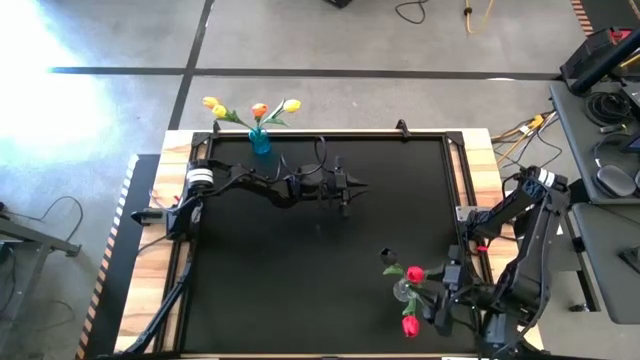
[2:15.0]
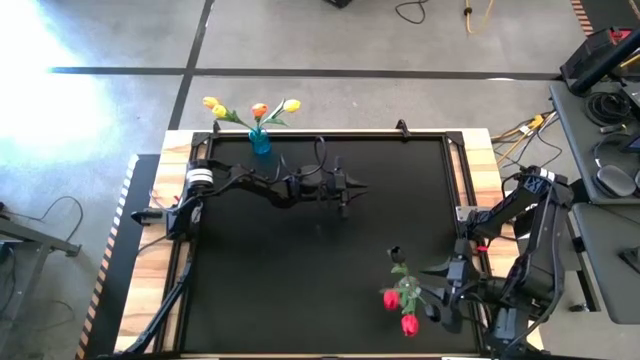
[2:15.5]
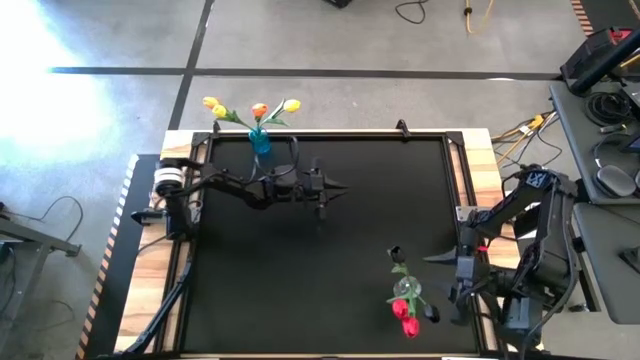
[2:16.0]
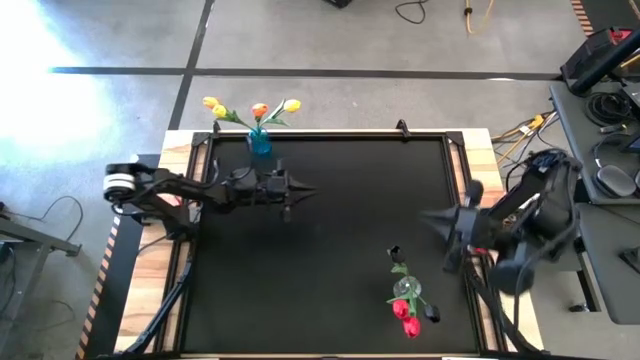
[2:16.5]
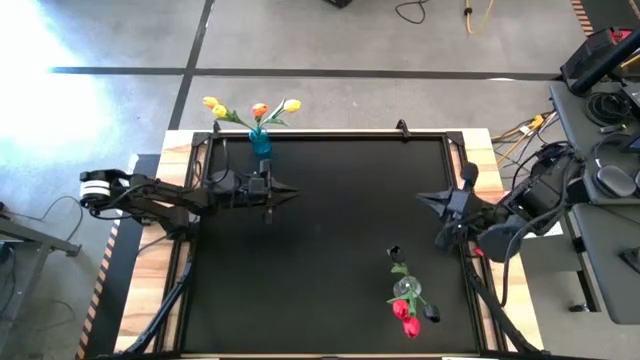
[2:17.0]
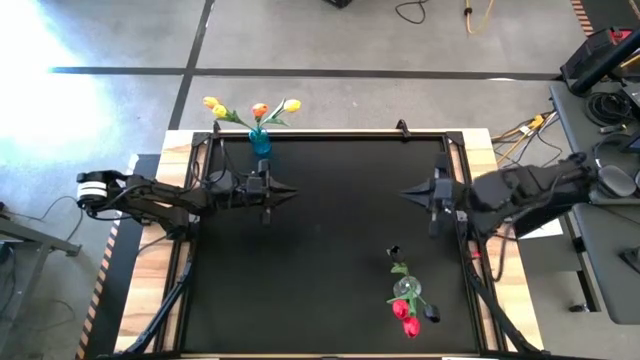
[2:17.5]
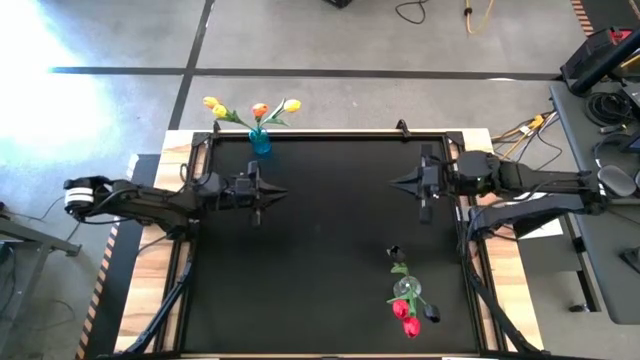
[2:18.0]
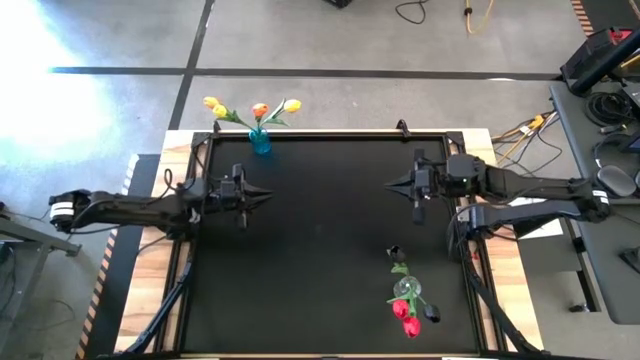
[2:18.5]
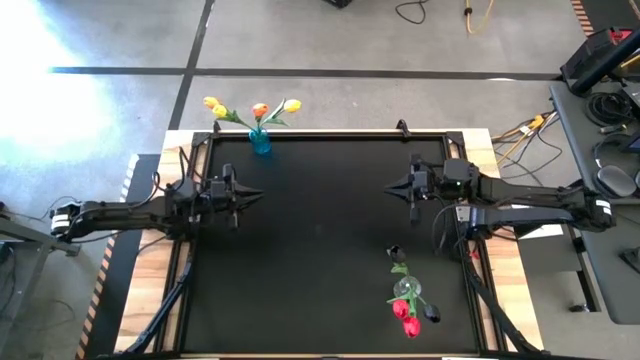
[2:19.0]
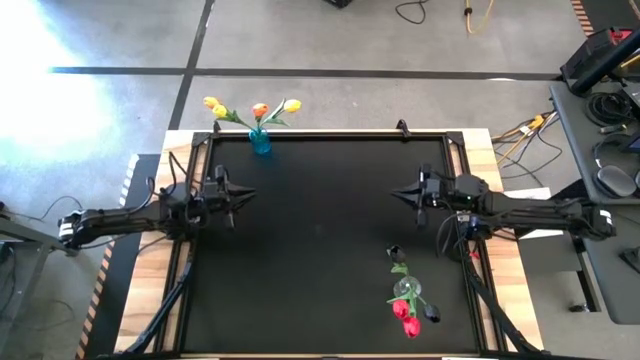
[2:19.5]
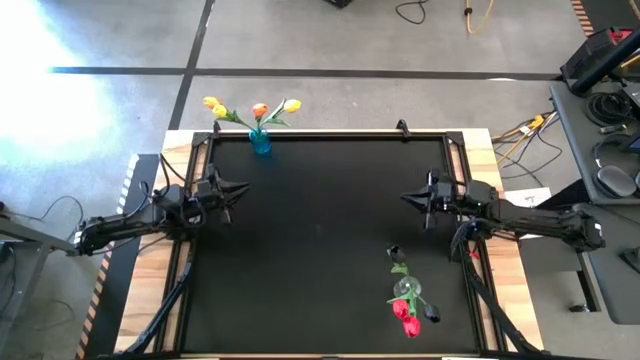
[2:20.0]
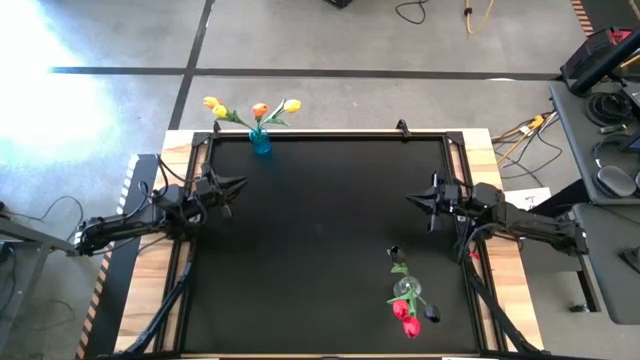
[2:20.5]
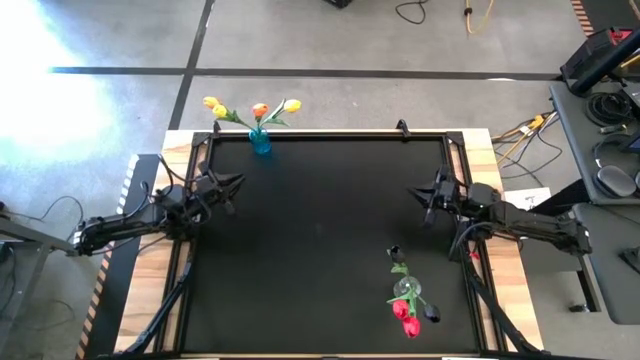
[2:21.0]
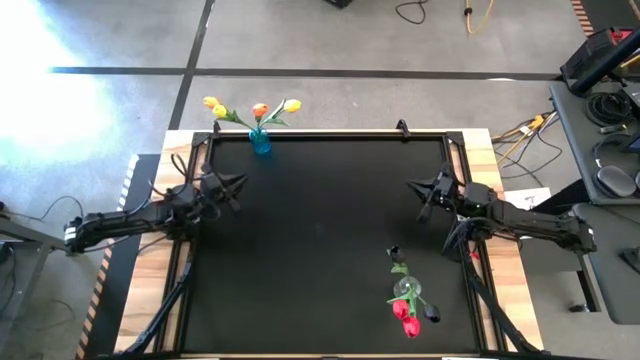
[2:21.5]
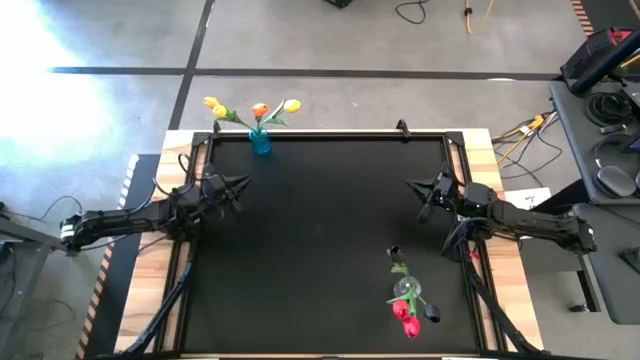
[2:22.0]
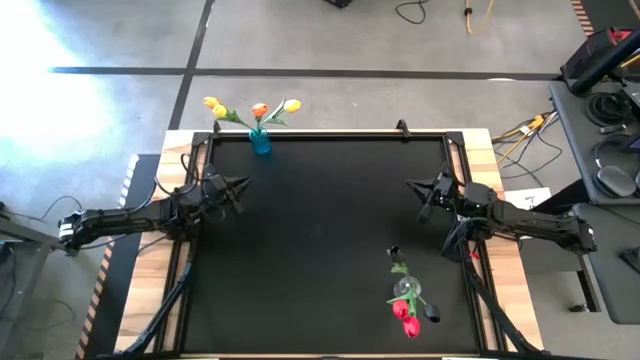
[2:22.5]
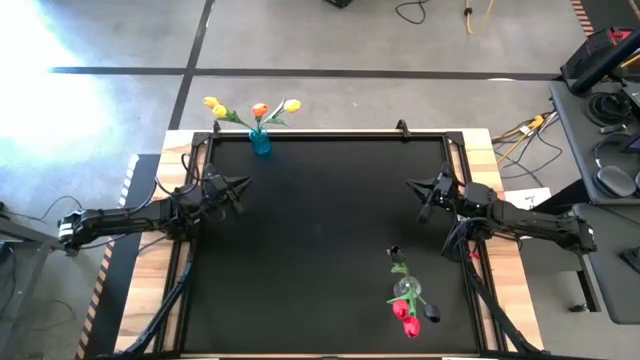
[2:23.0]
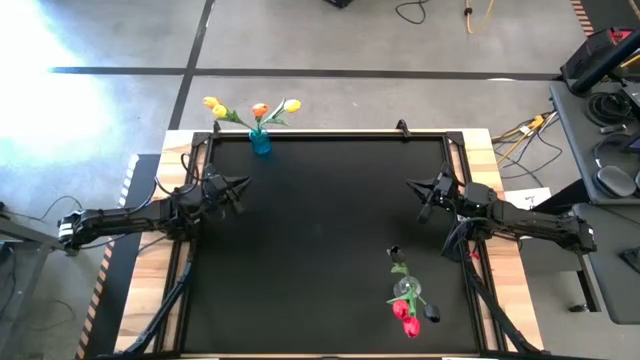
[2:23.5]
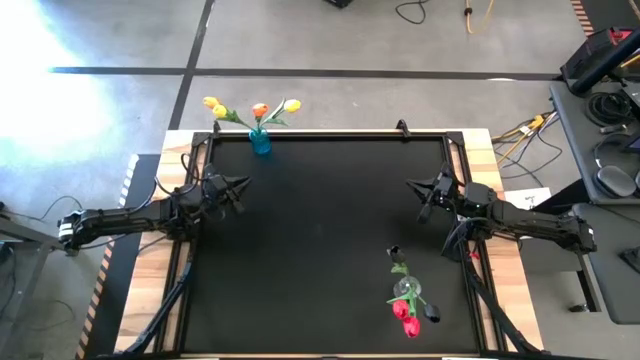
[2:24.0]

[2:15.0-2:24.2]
Task: Sort flowers into vase by color
Return to Home Position

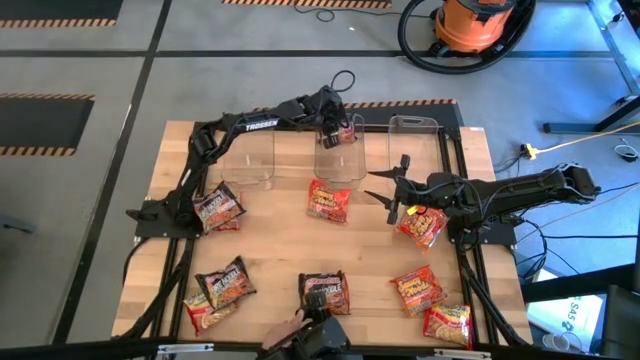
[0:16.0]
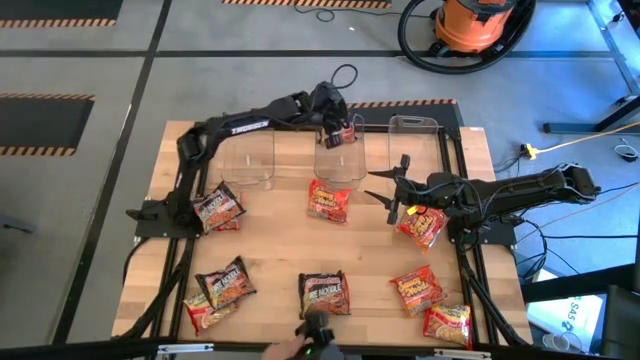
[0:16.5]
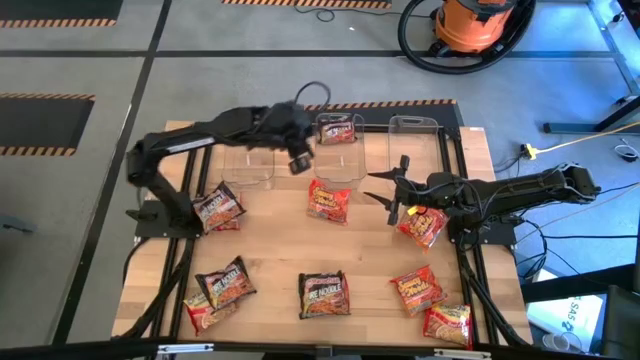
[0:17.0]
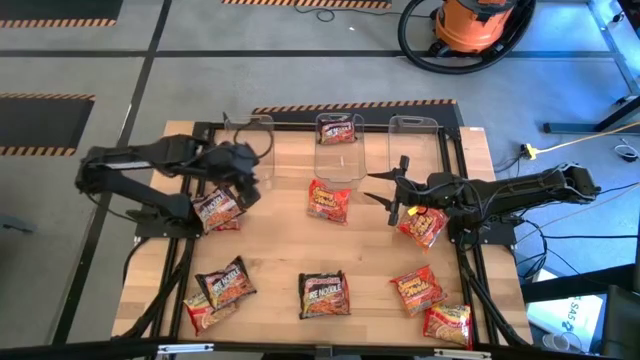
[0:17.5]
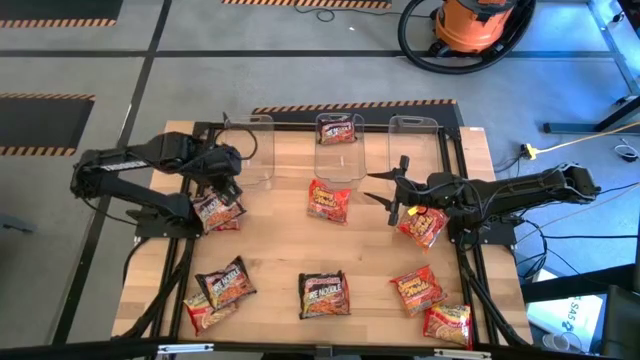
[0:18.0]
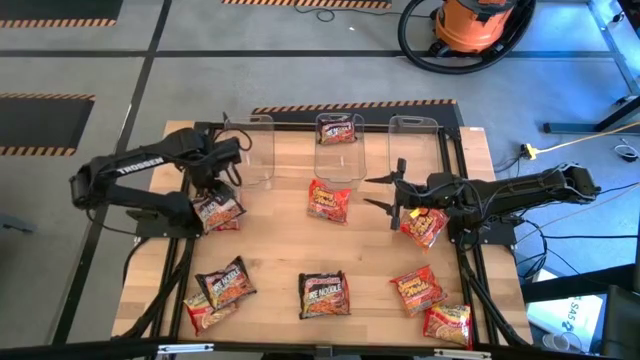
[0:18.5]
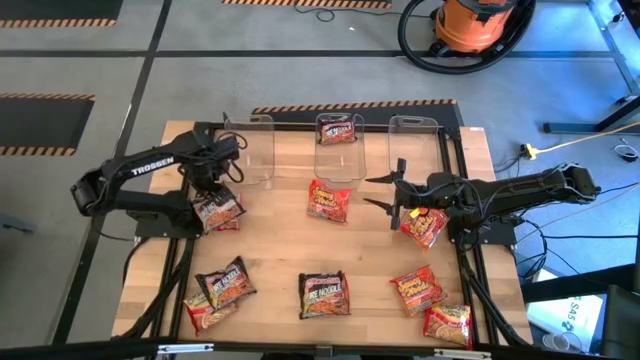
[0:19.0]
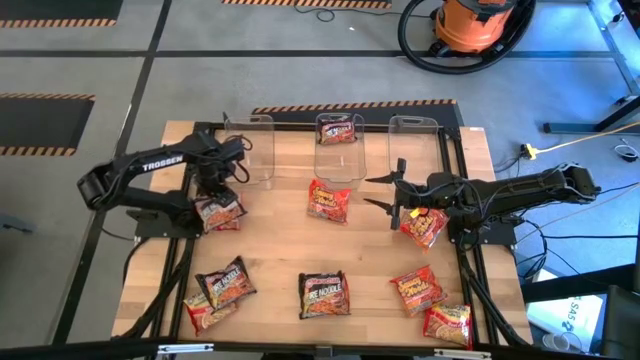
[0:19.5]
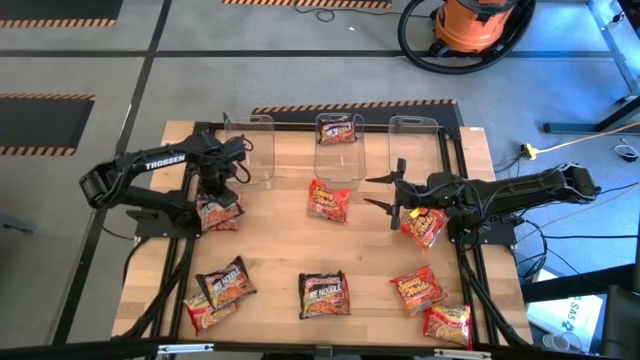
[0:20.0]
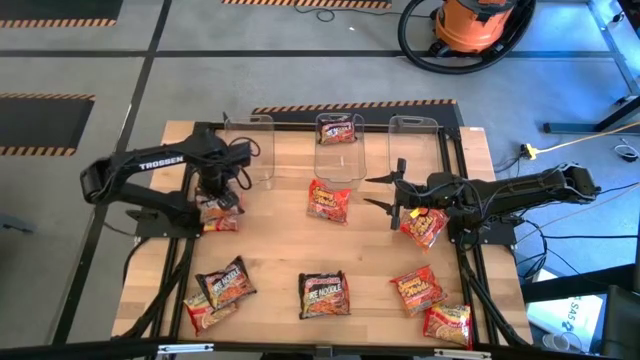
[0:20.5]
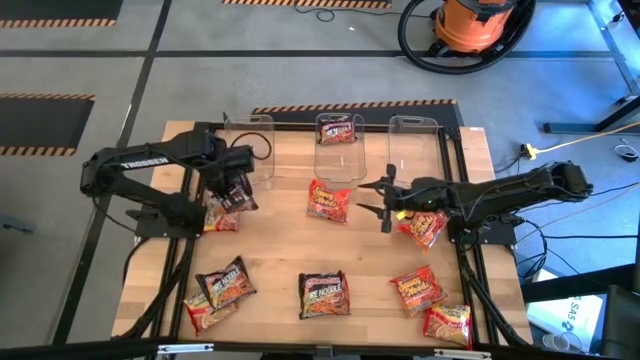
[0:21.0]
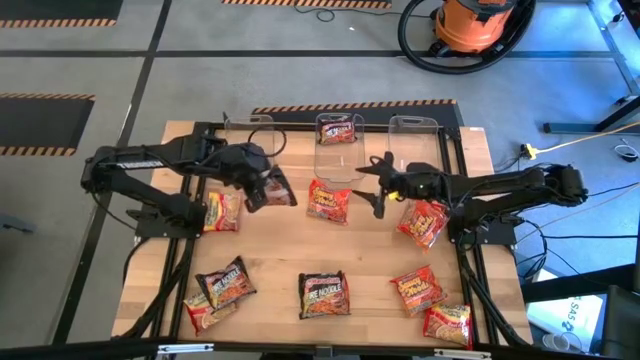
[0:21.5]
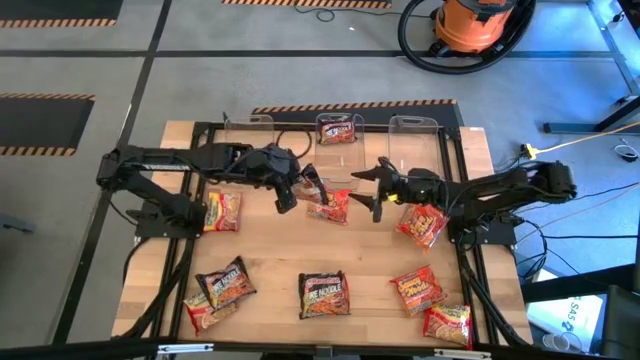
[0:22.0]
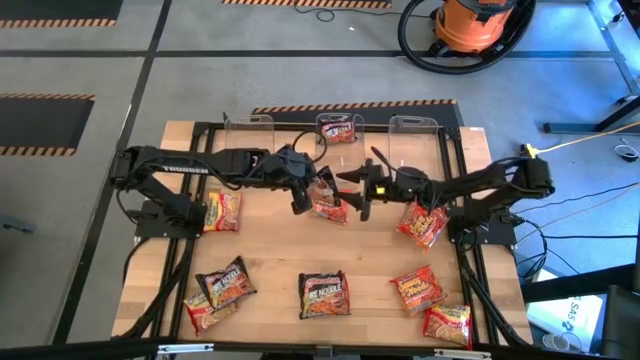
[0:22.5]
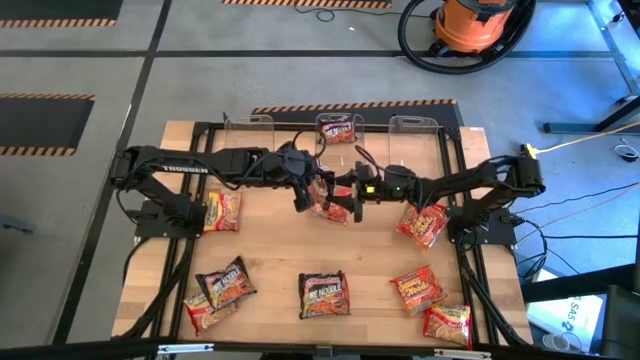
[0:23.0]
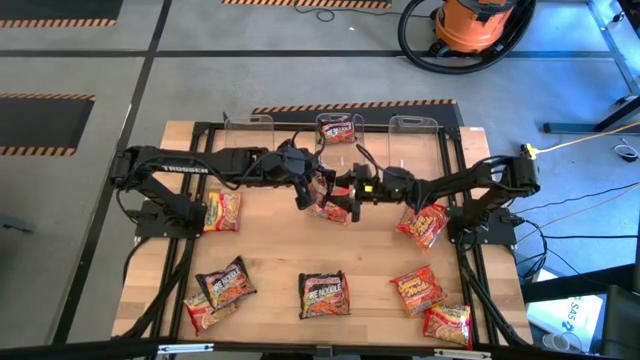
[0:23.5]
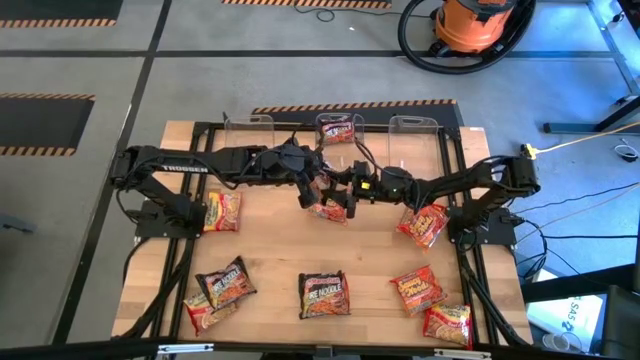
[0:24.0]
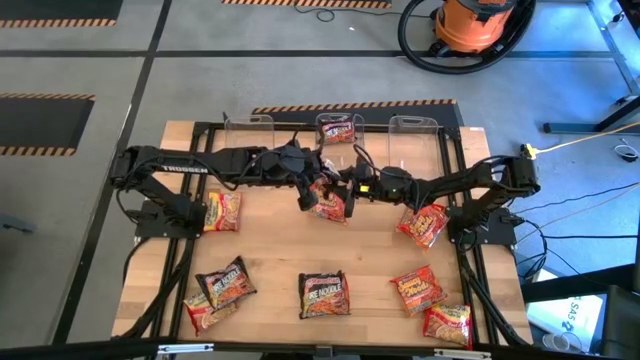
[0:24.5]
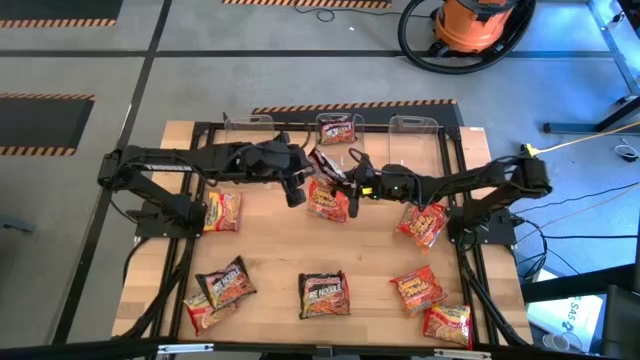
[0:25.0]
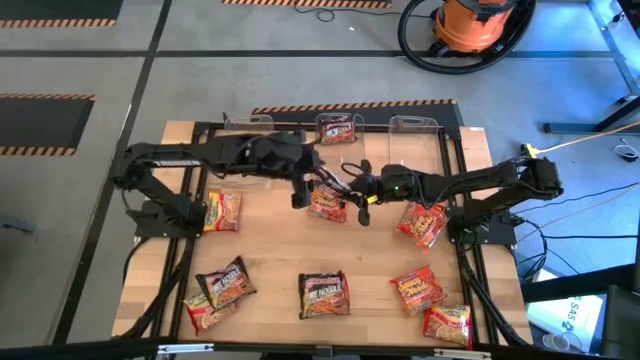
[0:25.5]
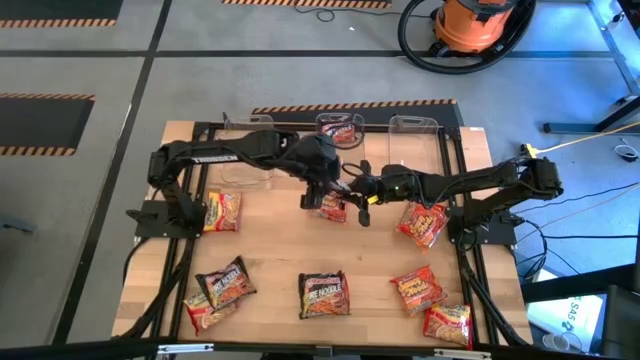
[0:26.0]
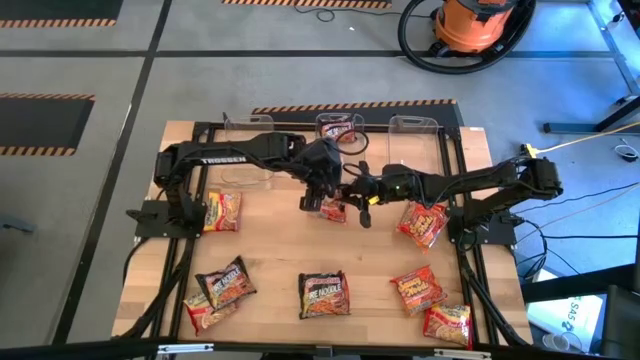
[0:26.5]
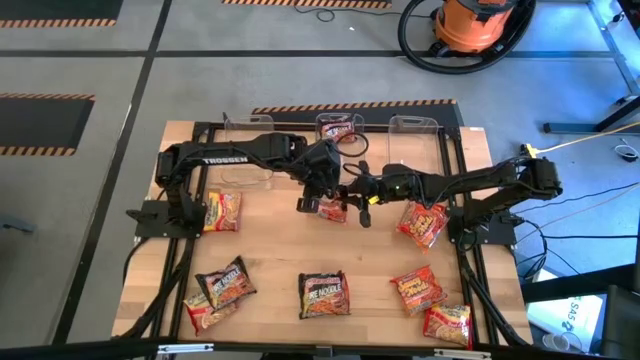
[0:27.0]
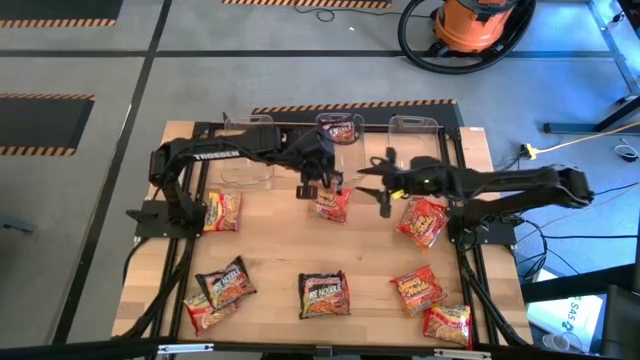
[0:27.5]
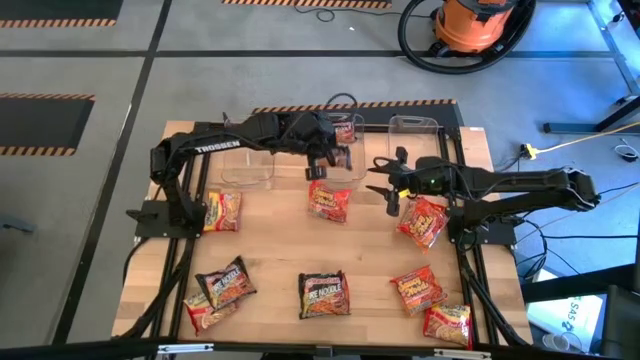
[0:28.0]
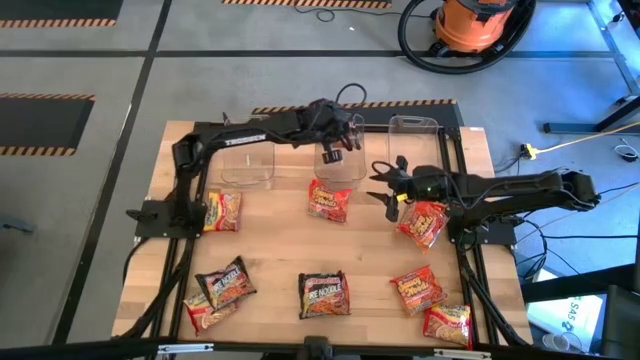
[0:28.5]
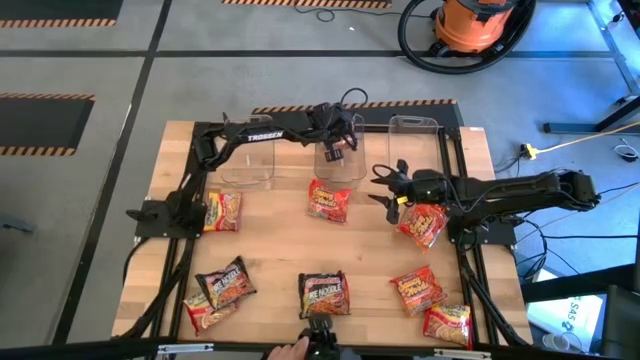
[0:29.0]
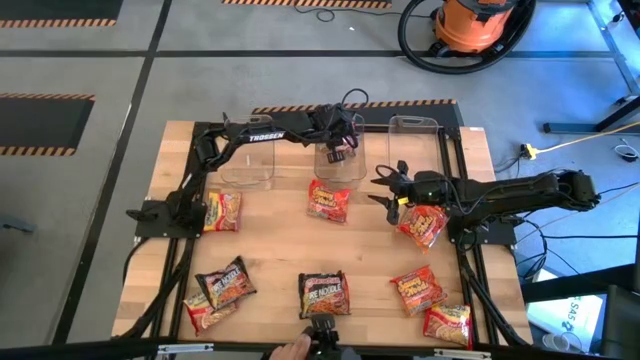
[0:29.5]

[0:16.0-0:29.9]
Task: Sort Maruchan noodles
Put the black noodle pack into the middle transparent bin
